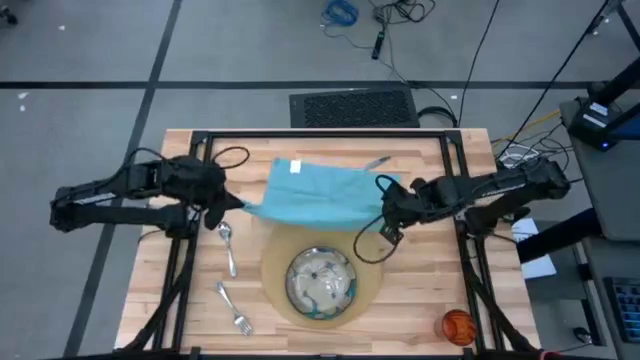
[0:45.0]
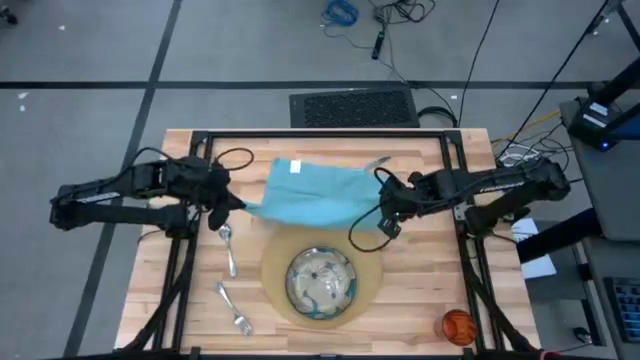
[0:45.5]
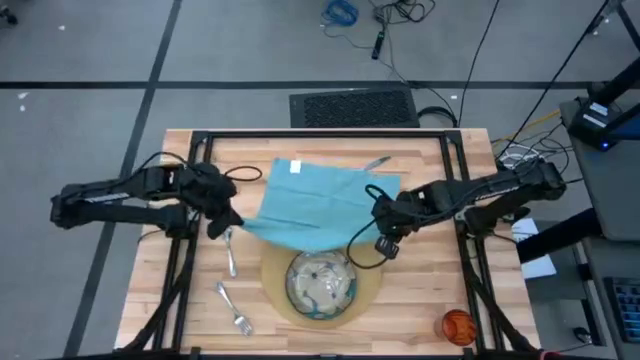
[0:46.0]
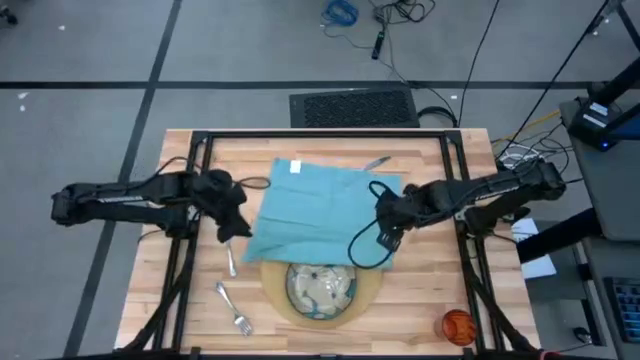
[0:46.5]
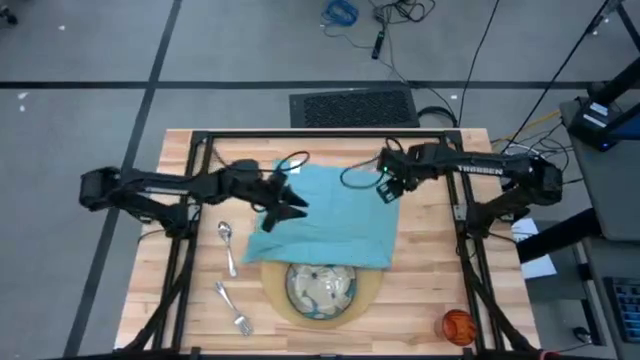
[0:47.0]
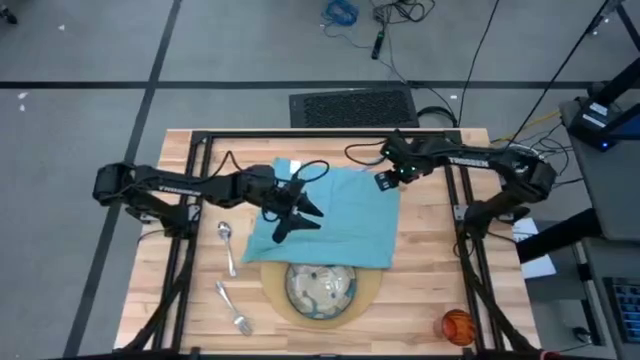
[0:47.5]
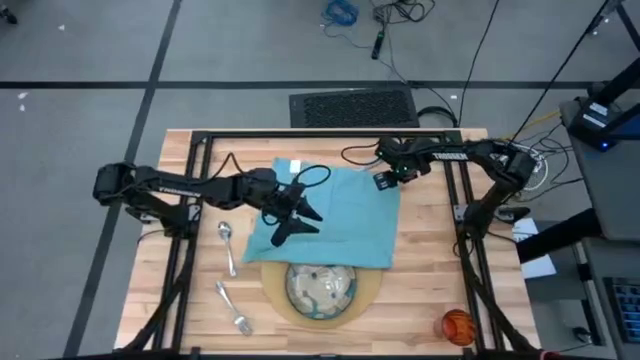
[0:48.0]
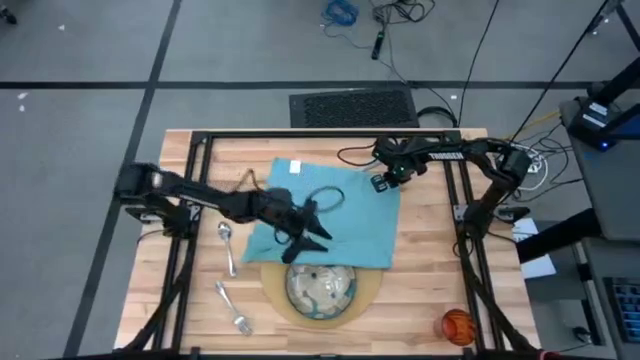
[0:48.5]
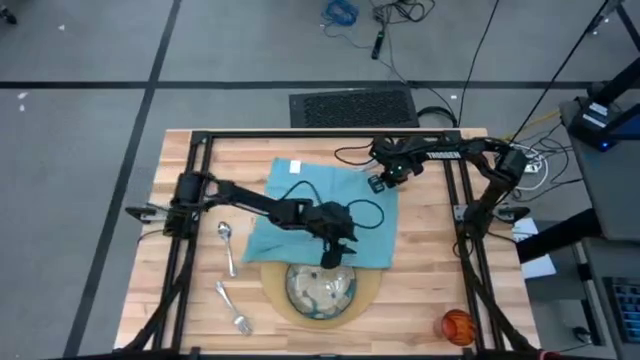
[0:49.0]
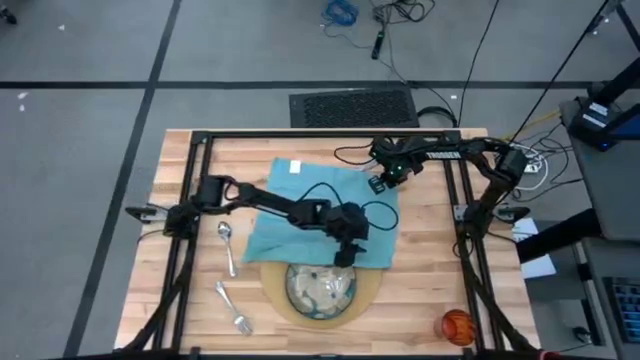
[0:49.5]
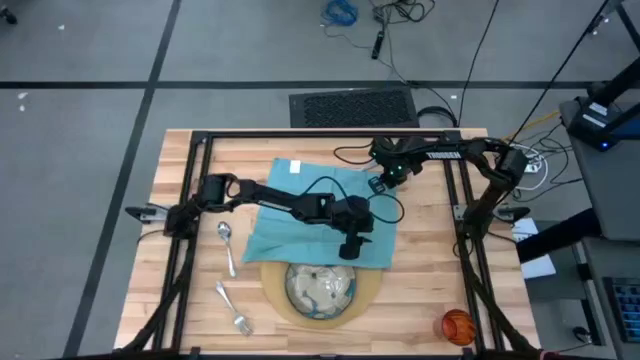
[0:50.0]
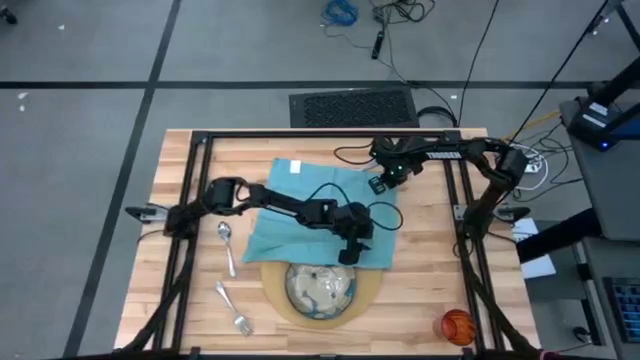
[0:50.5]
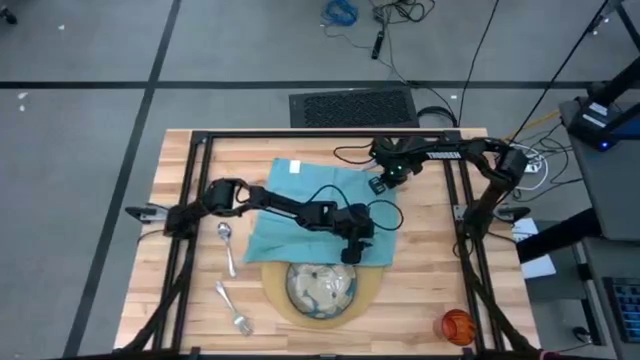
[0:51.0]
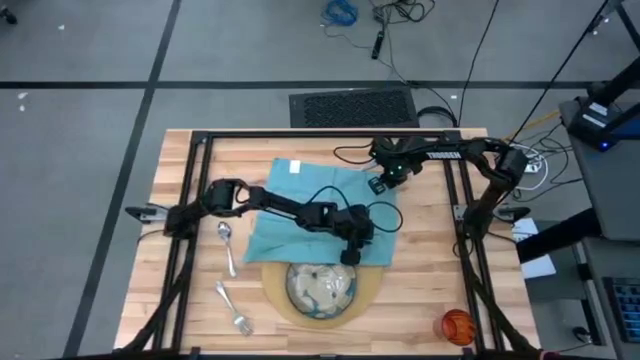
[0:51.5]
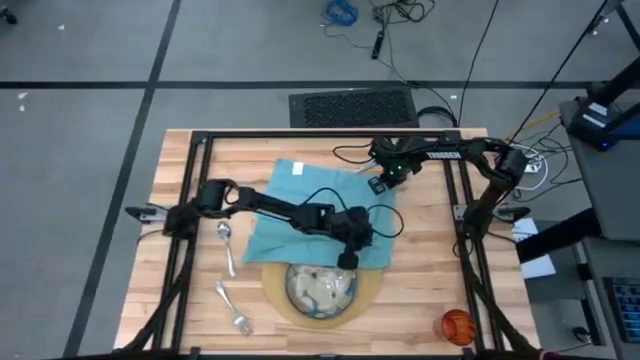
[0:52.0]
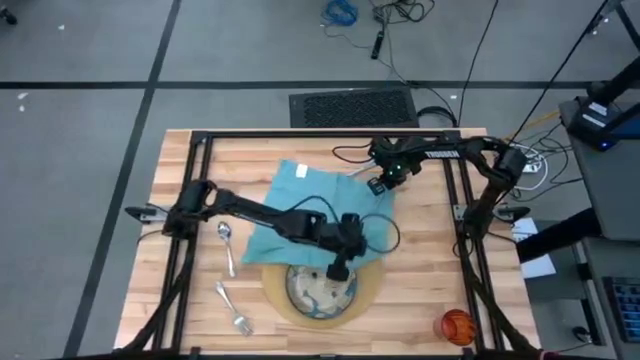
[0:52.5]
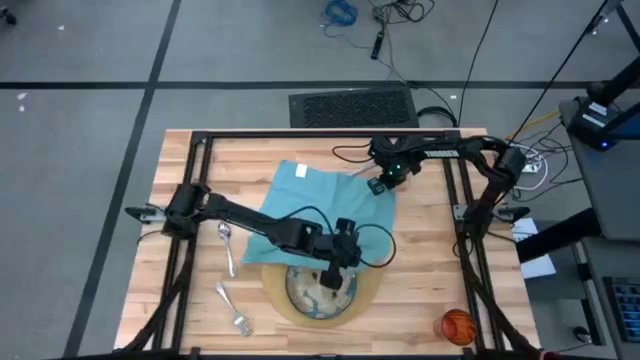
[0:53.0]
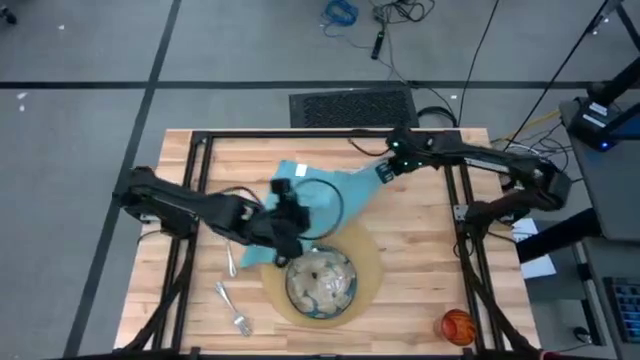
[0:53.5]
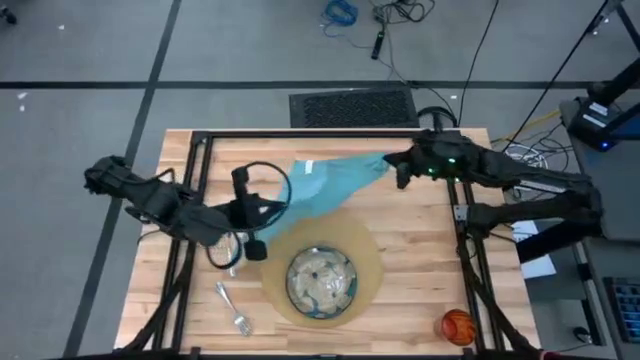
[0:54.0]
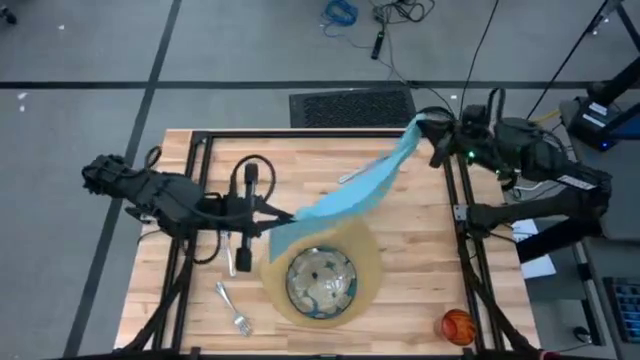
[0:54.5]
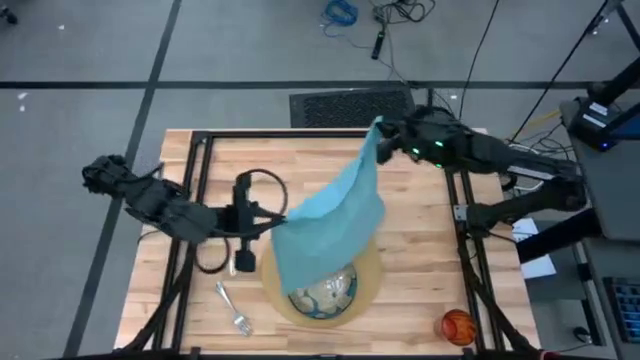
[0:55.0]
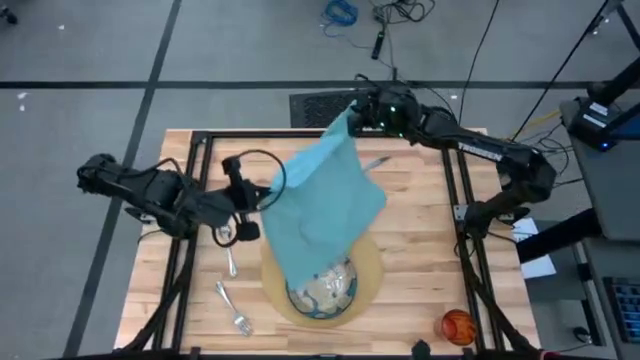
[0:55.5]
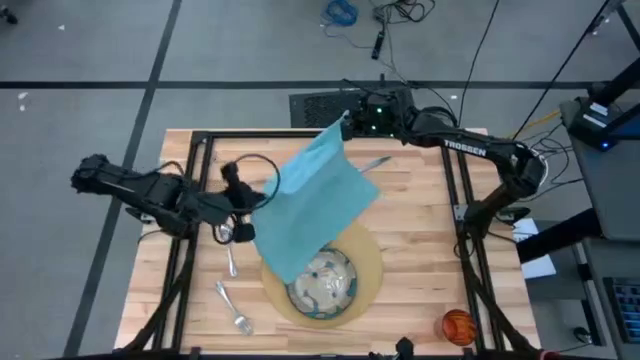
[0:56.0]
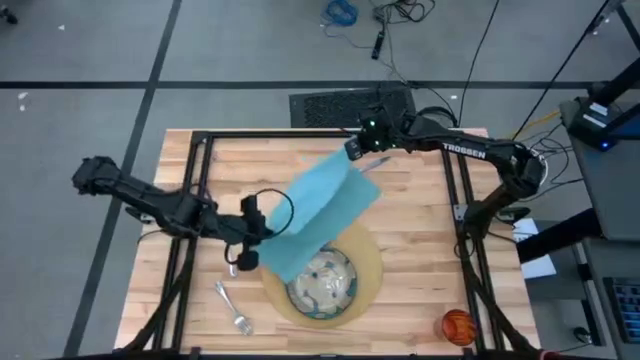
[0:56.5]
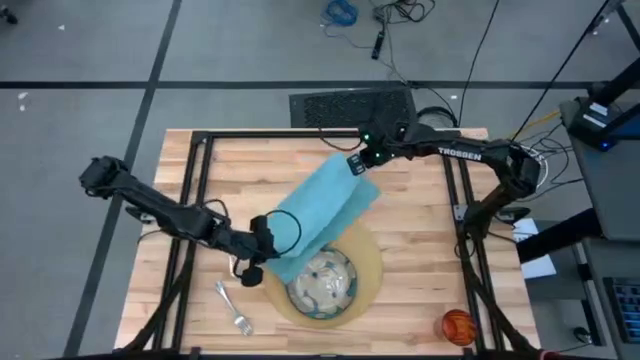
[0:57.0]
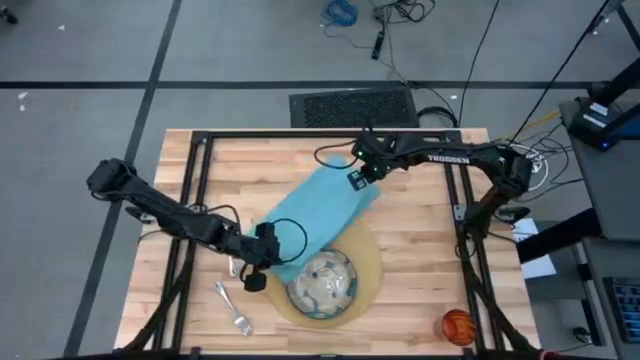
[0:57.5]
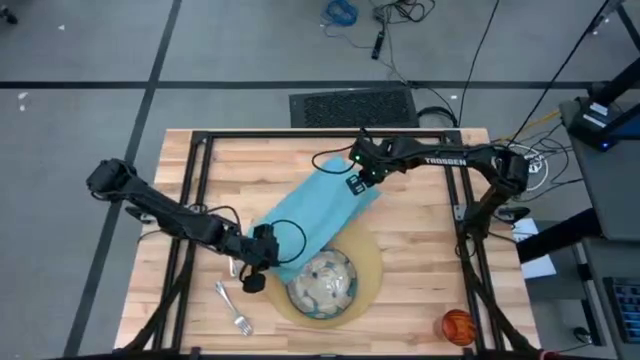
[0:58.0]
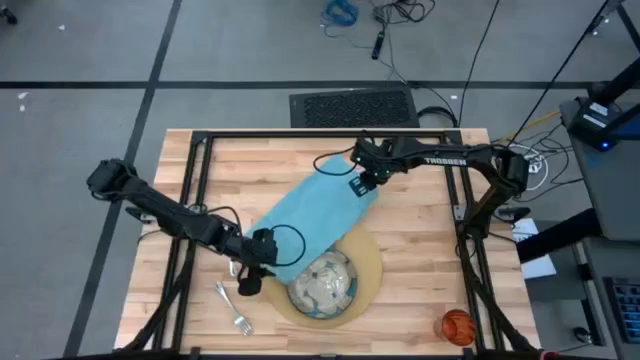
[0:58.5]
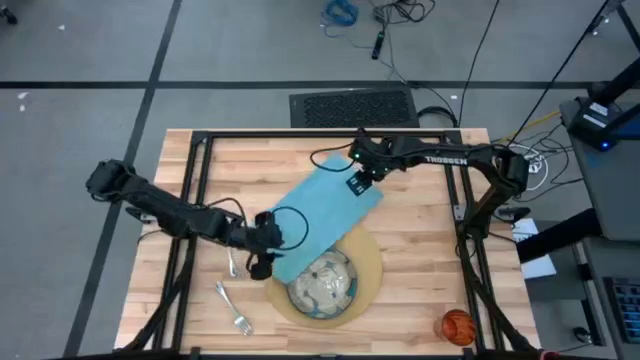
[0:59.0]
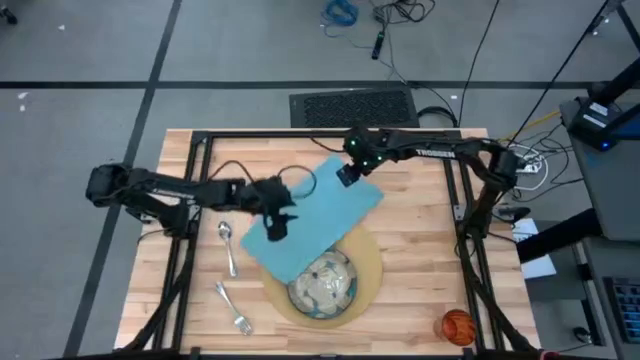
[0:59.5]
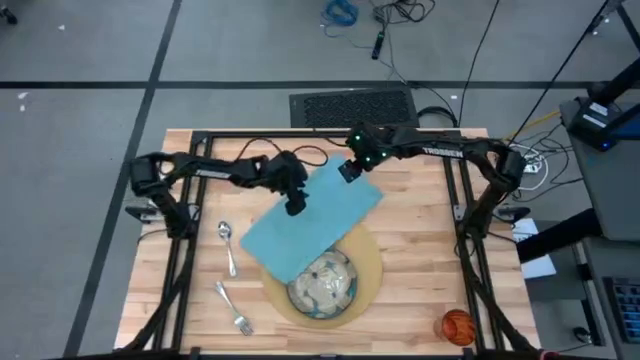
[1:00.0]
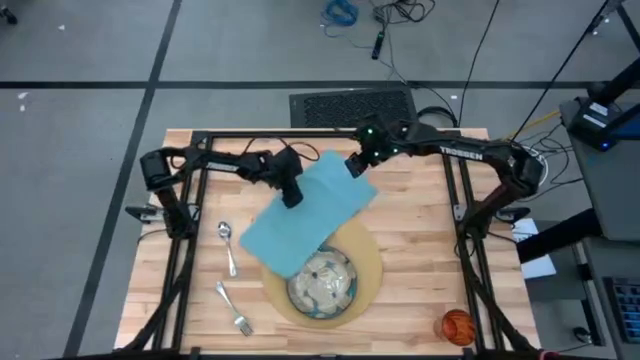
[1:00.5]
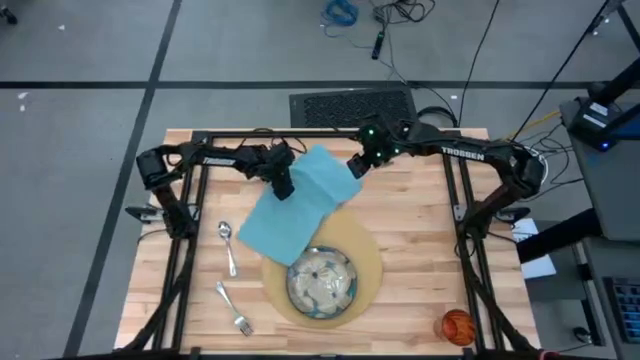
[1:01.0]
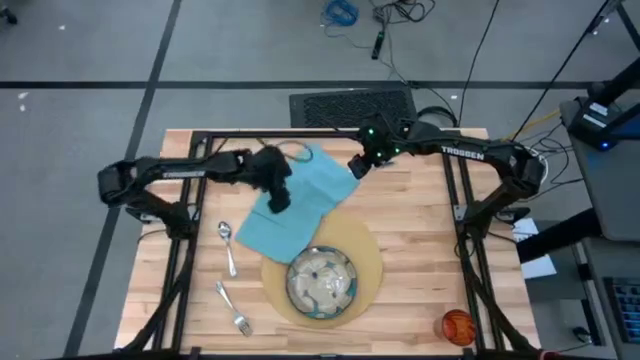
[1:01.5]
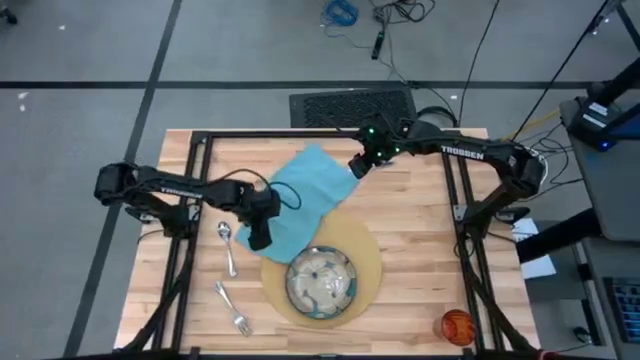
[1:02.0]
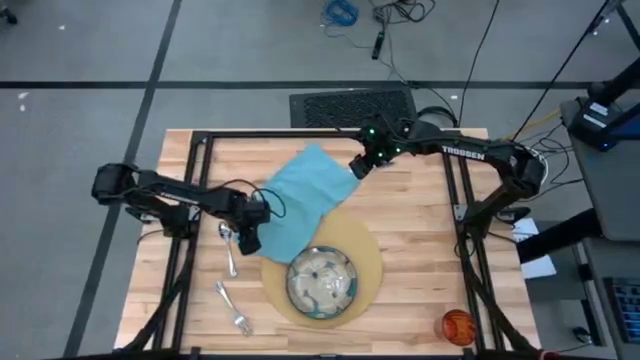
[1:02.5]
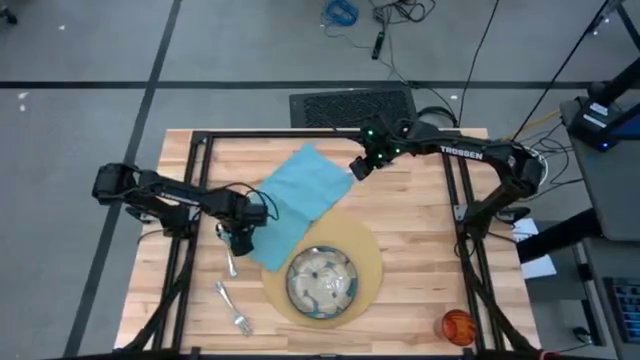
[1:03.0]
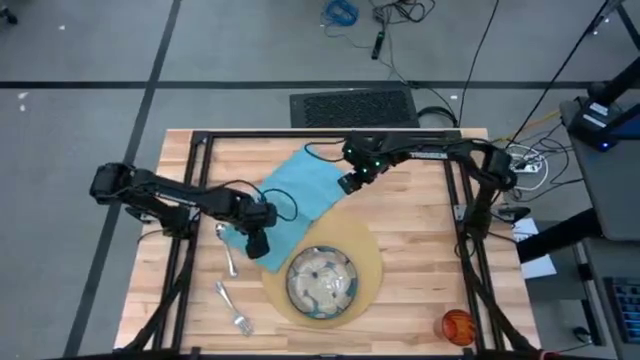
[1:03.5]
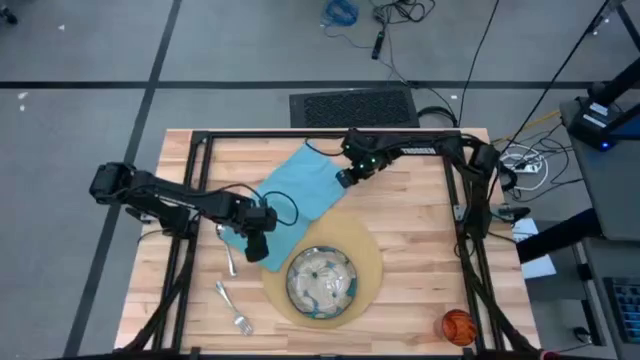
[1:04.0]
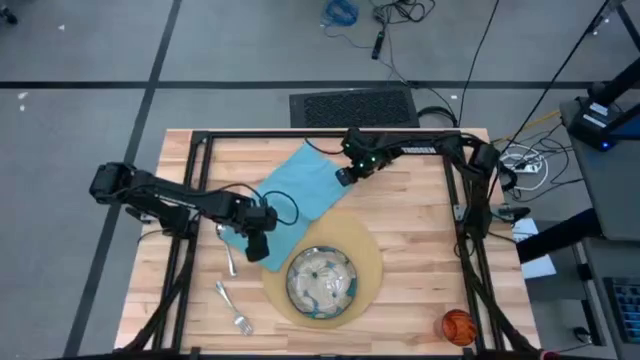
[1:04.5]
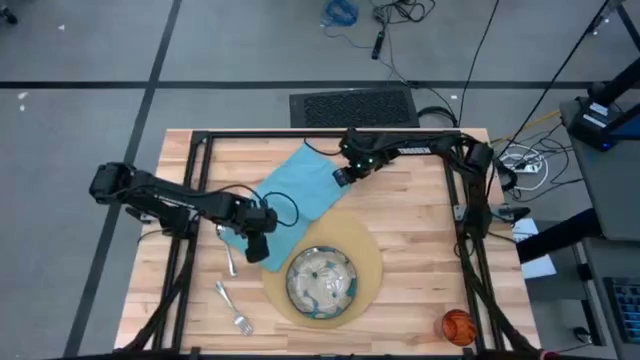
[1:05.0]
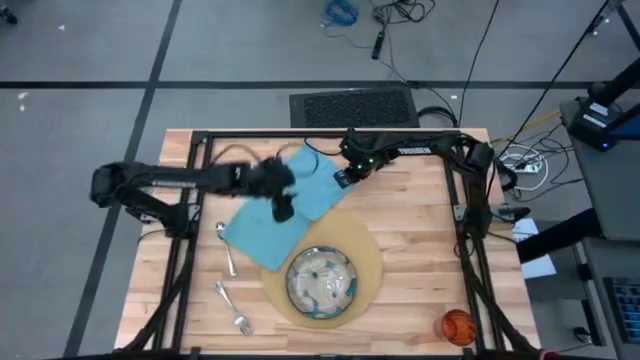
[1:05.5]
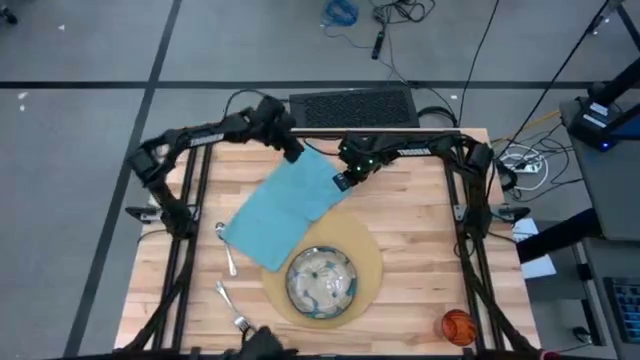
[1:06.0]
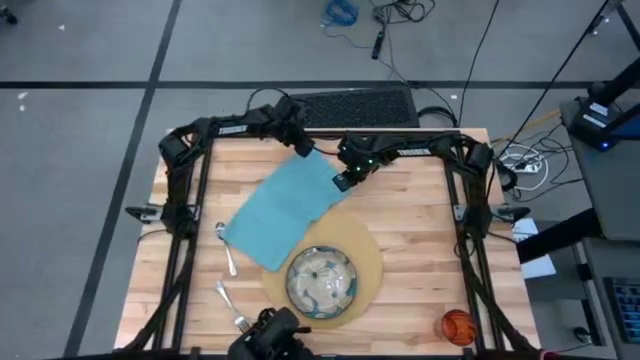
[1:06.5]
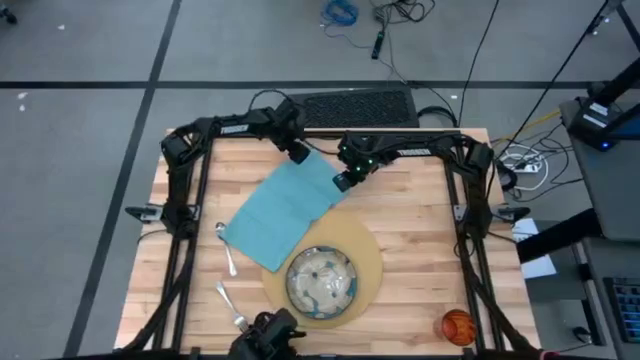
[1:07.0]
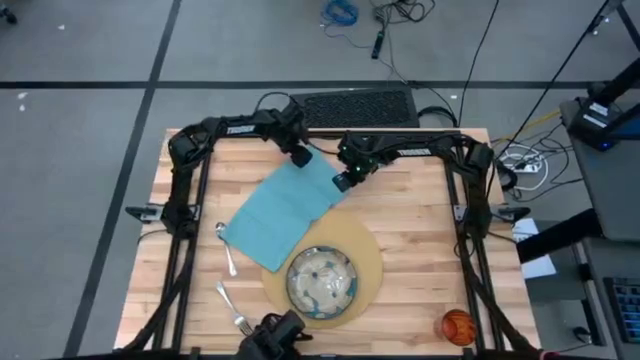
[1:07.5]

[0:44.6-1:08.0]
Task: Set table place
Fold the blue napkin
